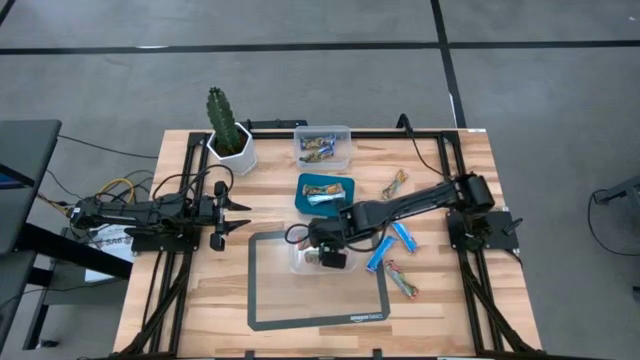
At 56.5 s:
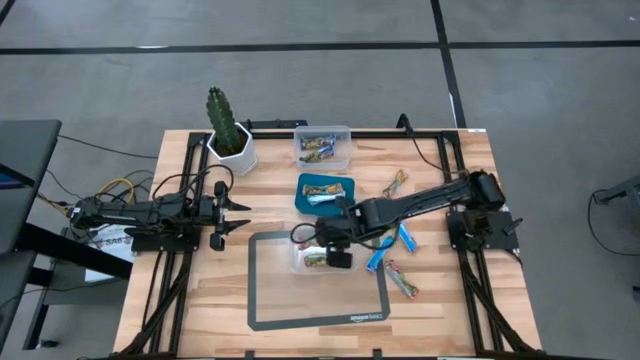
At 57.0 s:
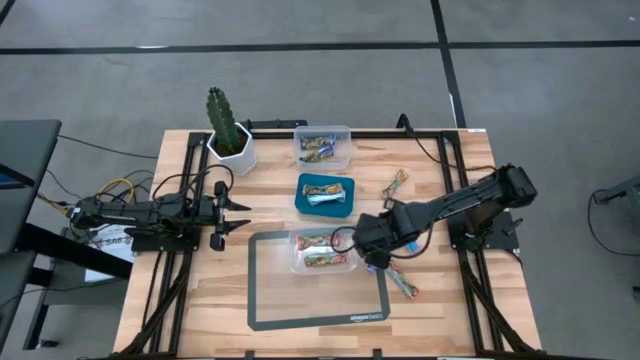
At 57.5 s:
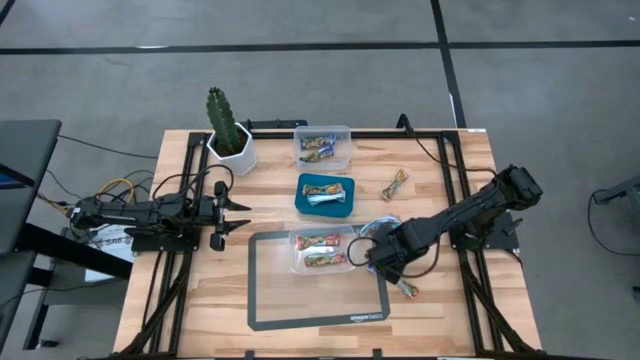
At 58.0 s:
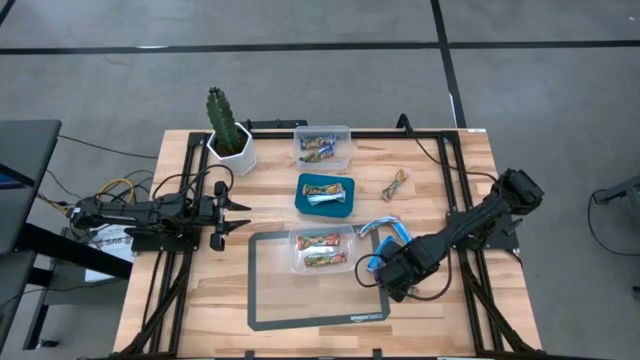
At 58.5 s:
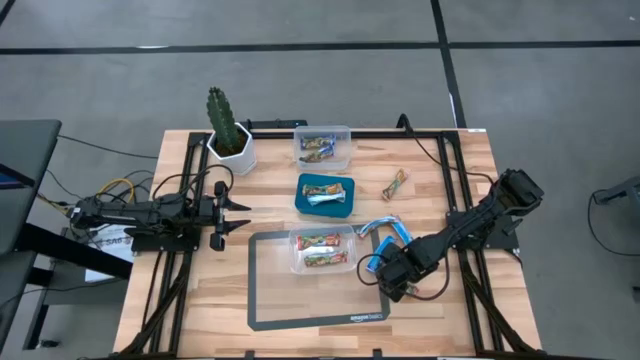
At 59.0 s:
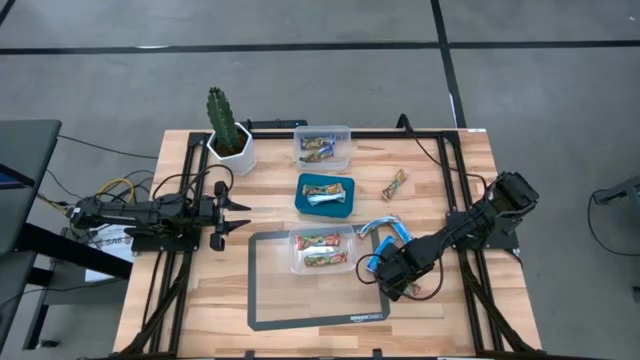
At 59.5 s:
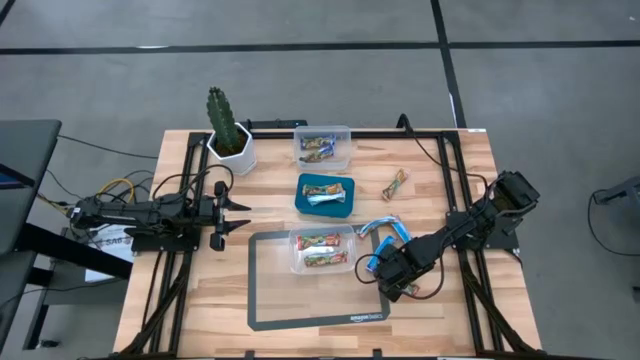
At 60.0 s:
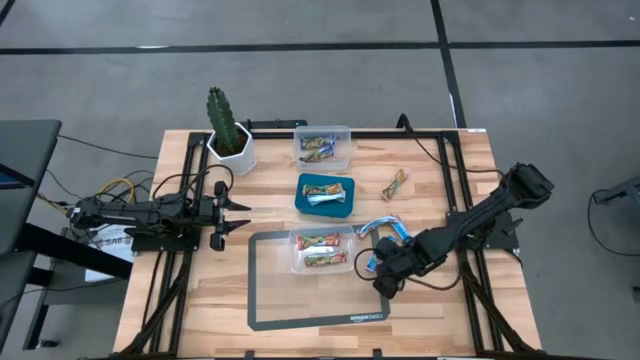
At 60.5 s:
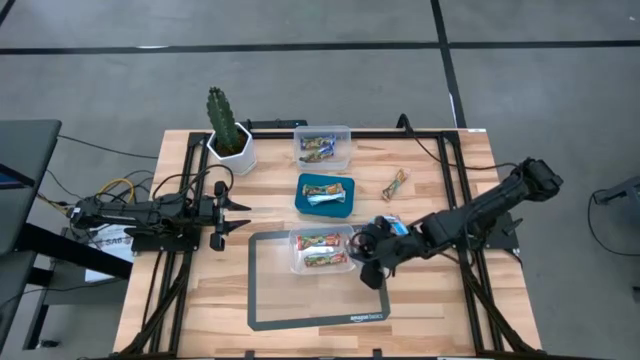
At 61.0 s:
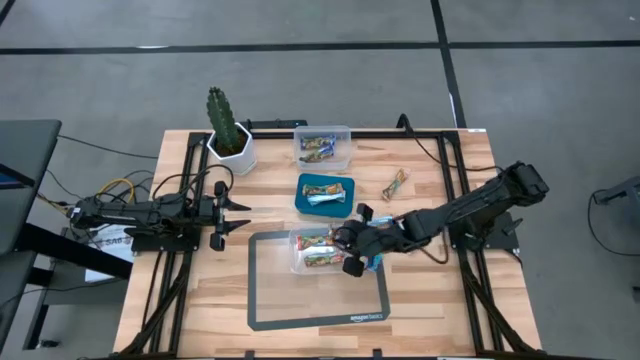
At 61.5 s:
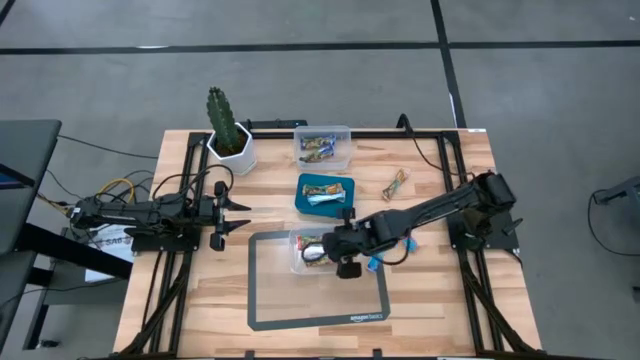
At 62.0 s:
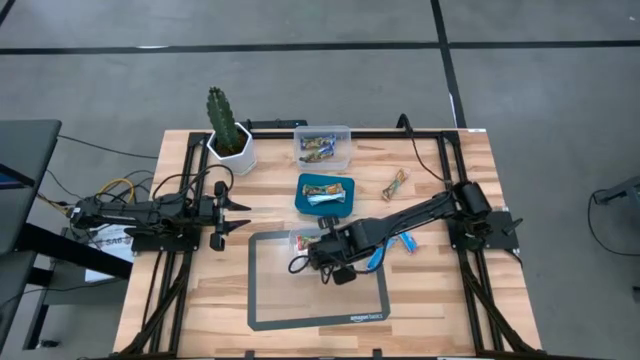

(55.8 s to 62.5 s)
Task: Pick and place Granola Bars by type
Put the red granola bar into the bottom transparent bin

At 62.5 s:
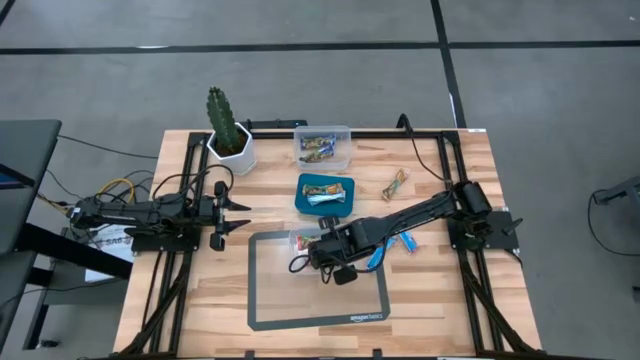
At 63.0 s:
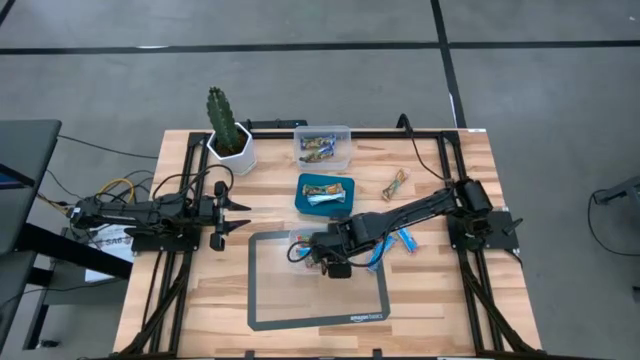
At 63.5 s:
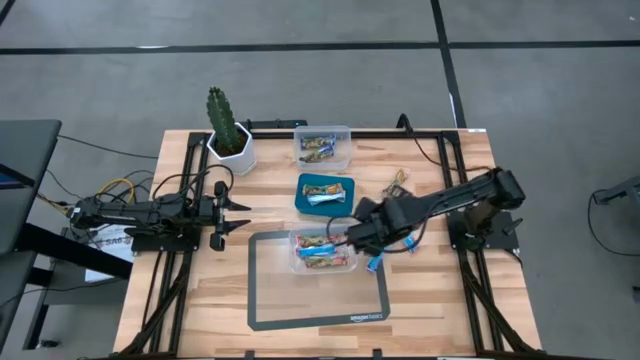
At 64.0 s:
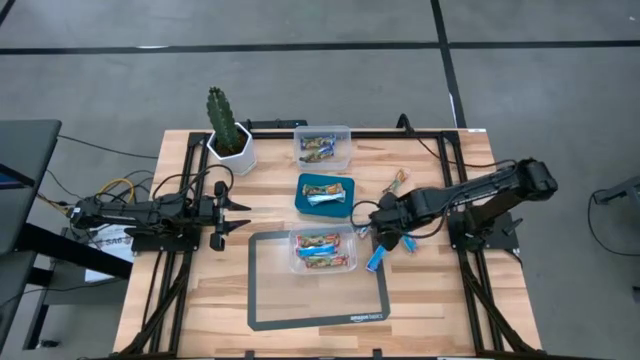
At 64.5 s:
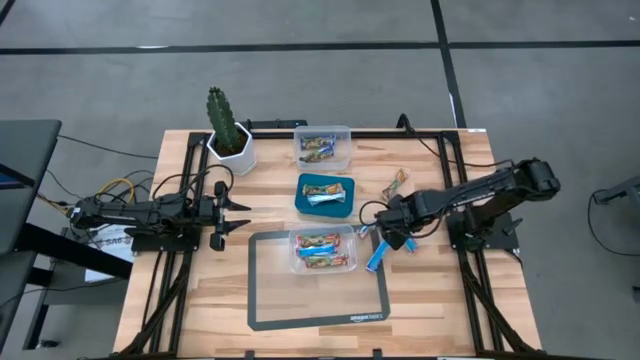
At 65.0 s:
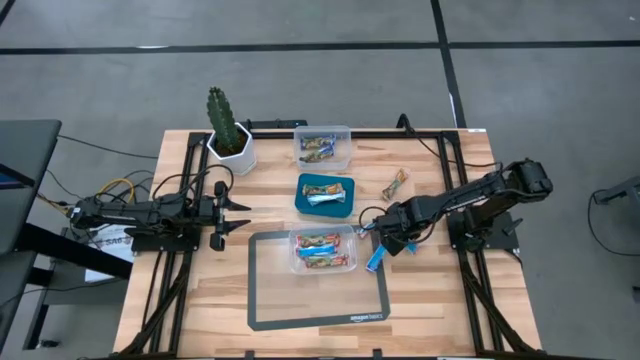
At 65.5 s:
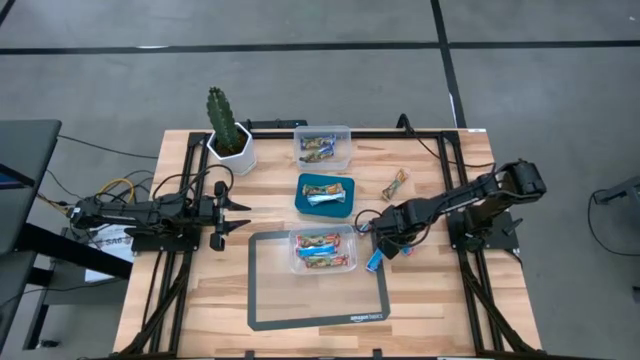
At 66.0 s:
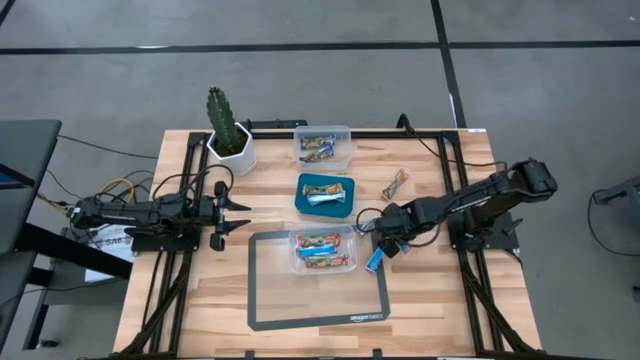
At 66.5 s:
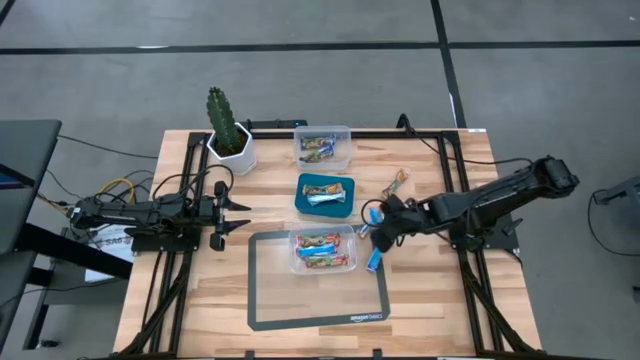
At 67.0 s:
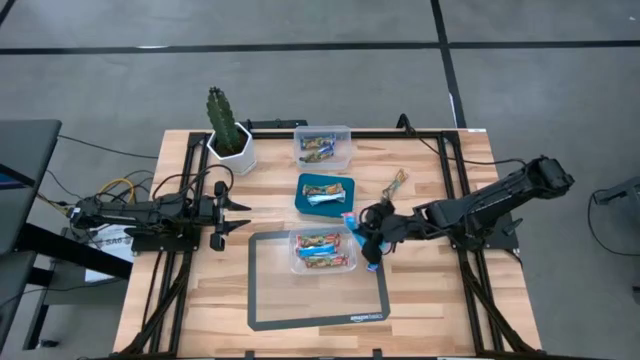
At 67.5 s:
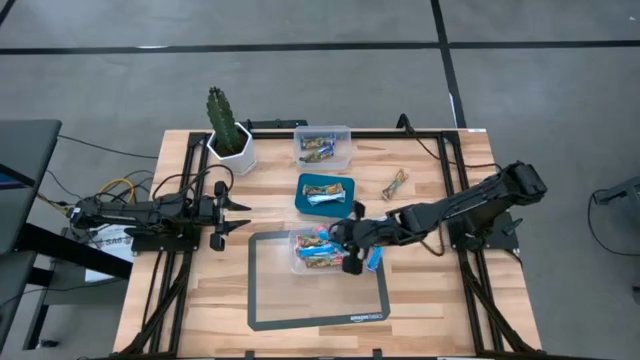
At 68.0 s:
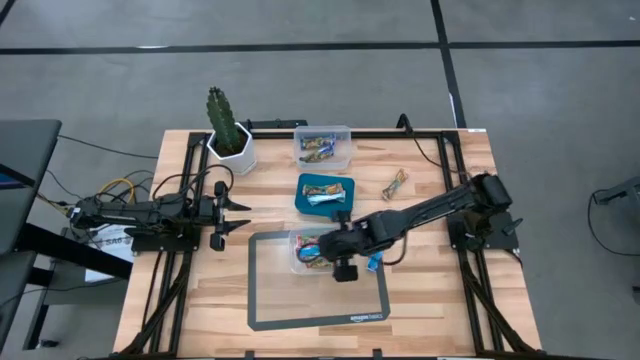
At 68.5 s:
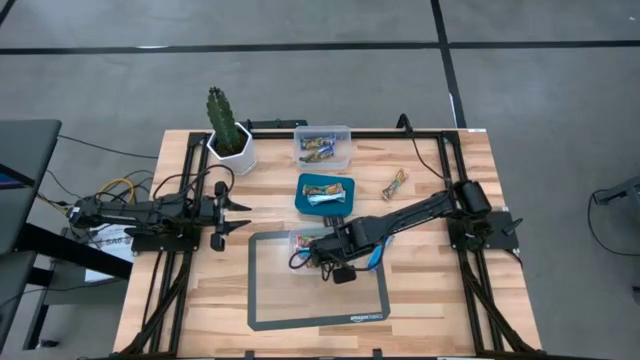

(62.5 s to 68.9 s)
Put the red granola bar into the bottom transparent bin

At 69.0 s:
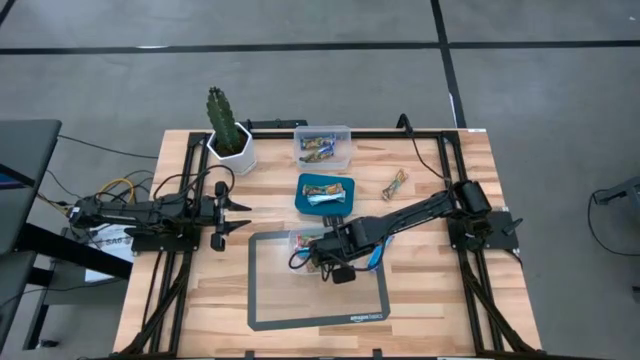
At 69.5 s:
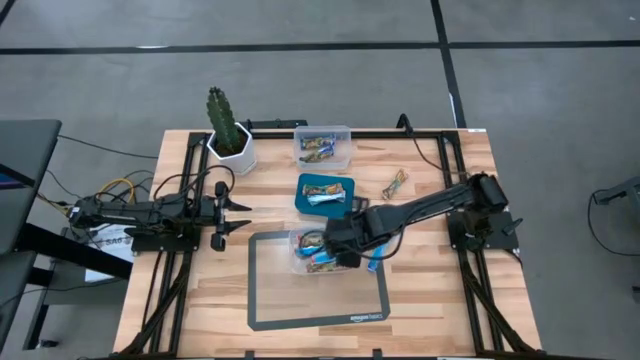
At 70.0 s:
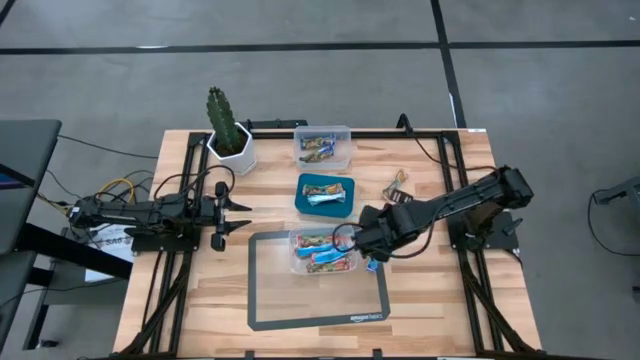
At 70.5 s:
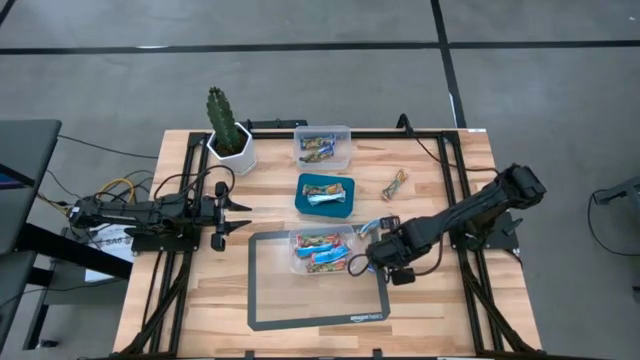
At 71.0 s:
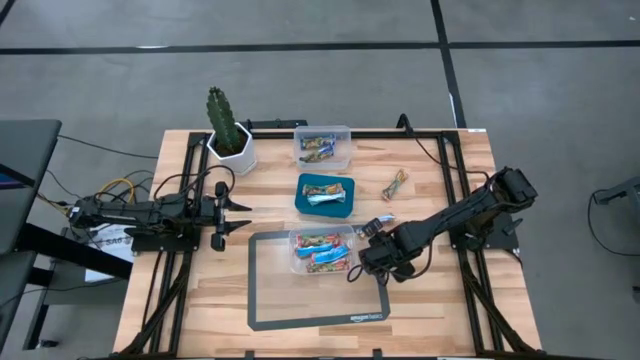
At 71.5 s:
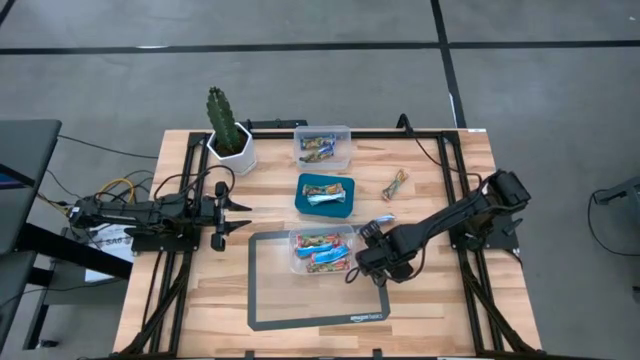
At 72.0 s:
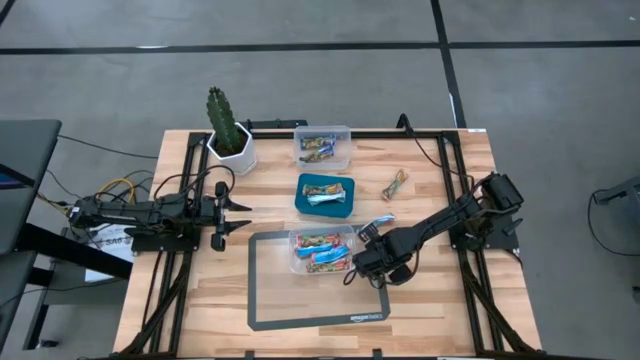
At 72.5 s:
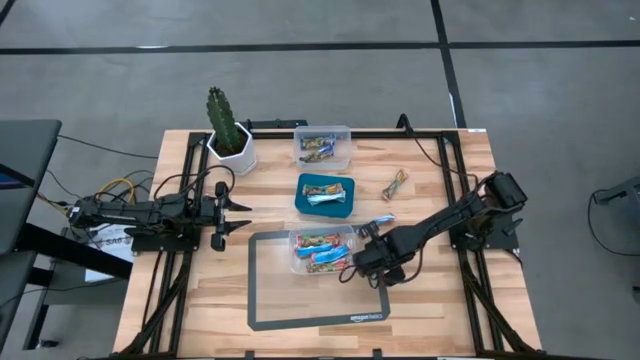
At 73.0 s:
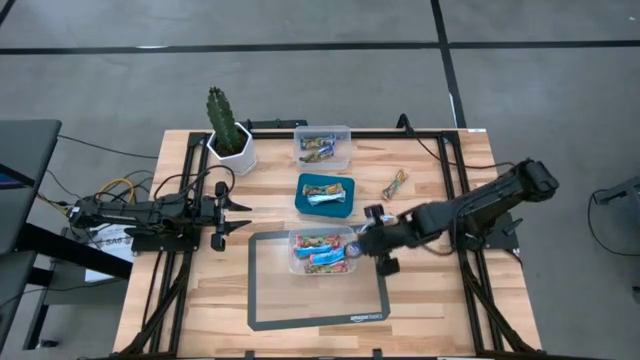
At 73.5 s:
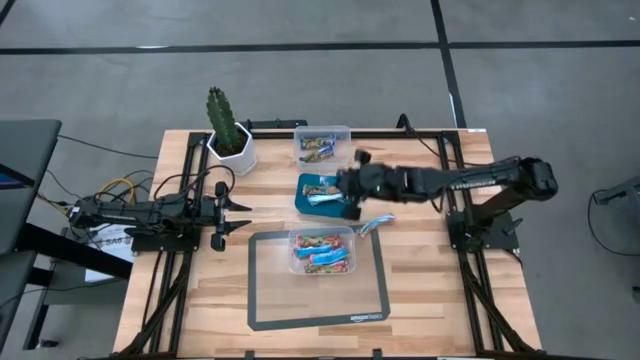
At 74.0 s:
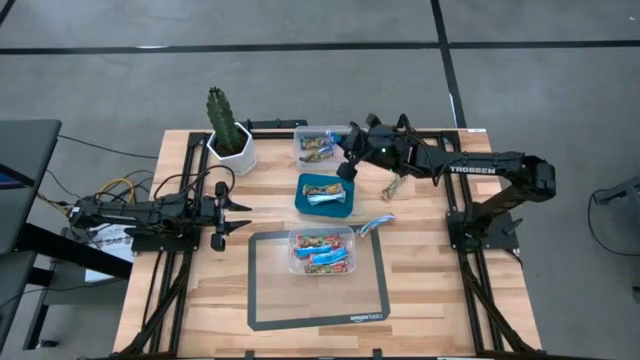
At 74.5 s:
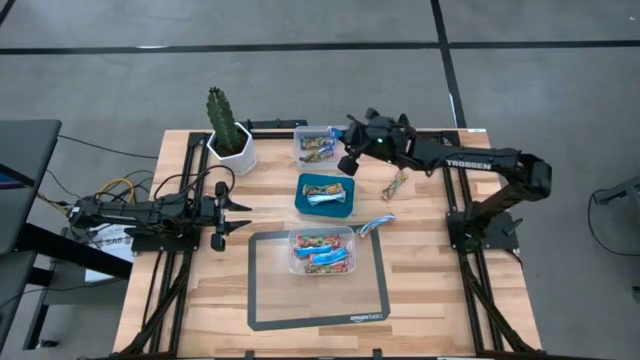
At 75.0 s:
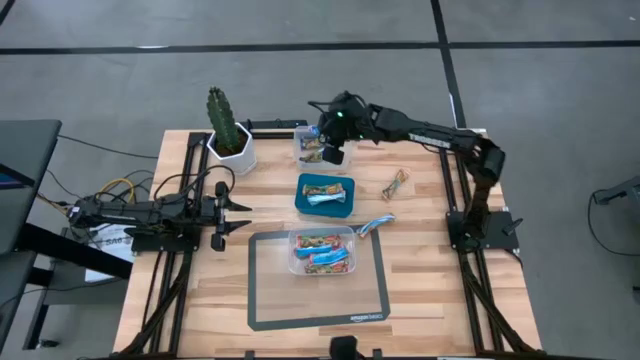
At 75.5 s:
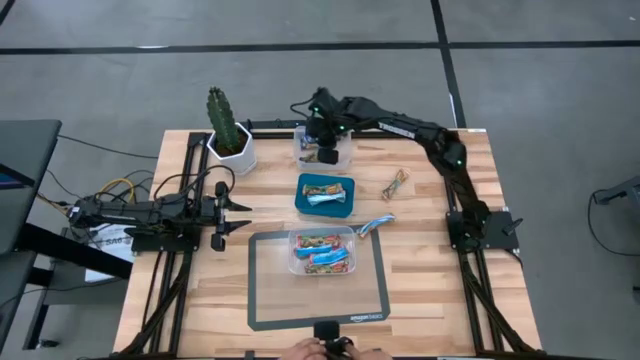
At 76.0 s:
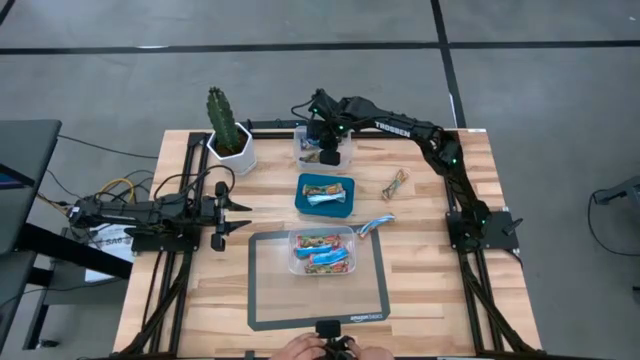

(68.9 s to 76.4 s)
Put the blue granola bar into the top transparent bin

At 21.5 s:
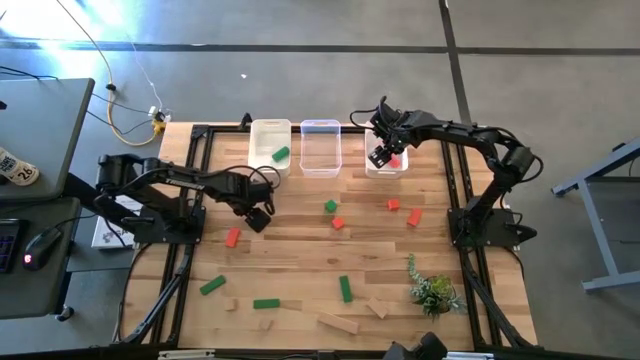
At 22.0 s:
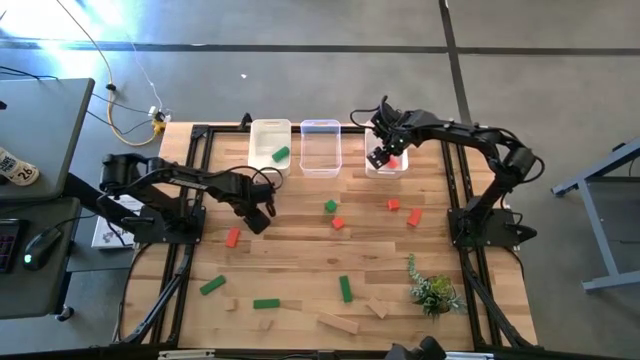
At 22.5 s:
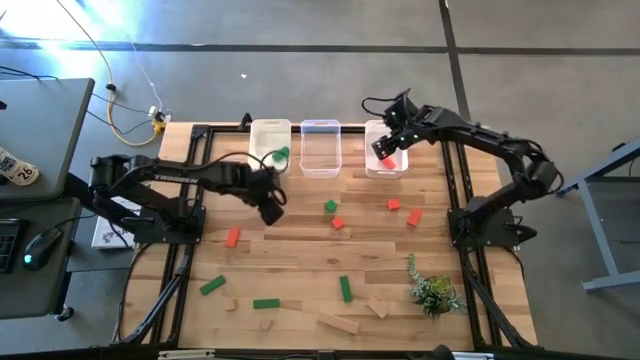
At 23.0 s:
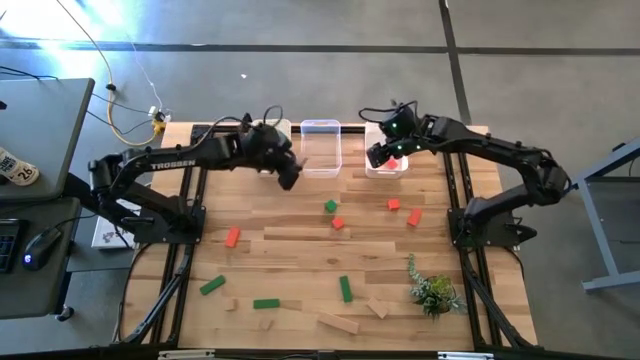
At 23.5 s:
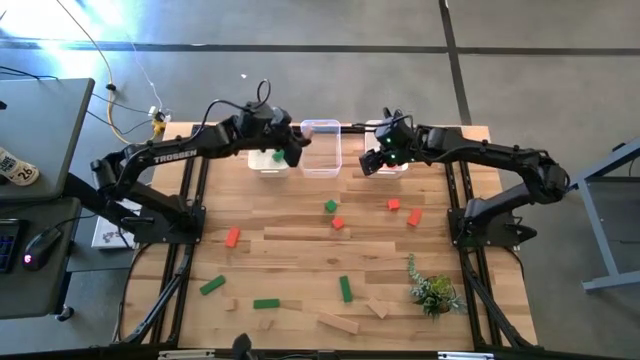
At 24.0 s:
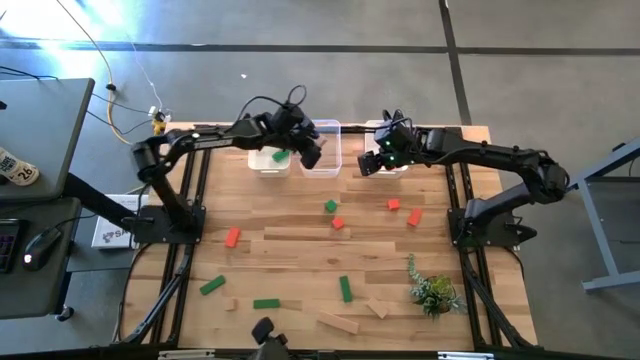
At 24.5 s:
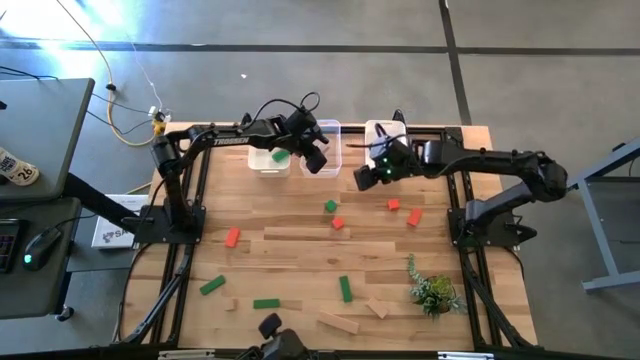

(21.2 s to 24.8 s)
Task: Sort & place blocks by color
Put the brown block into the transparent bin
